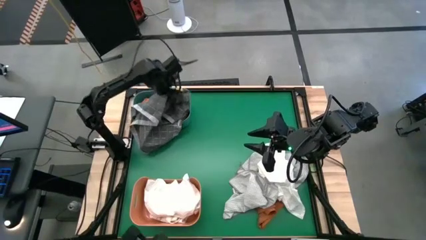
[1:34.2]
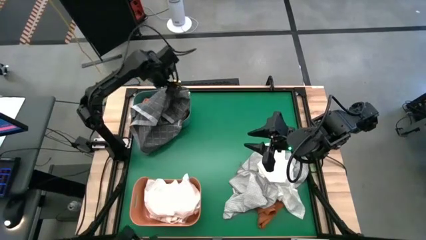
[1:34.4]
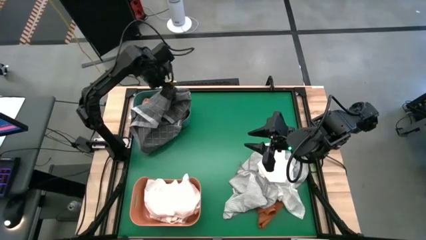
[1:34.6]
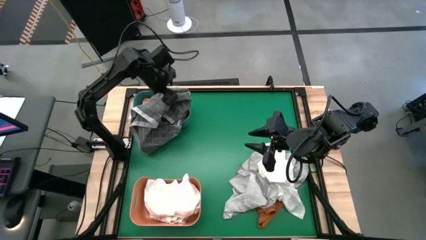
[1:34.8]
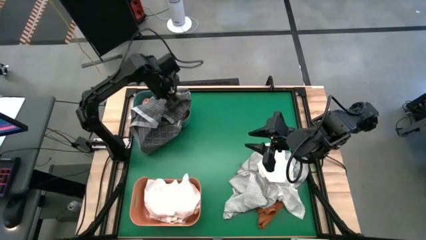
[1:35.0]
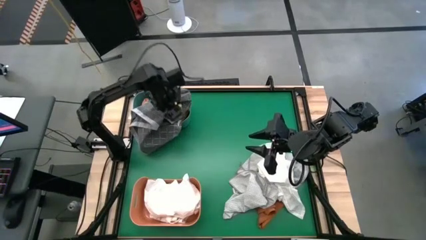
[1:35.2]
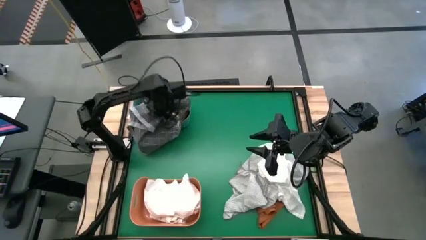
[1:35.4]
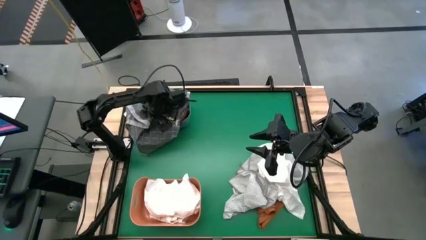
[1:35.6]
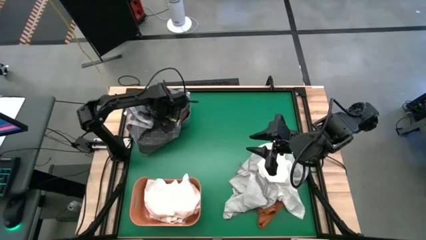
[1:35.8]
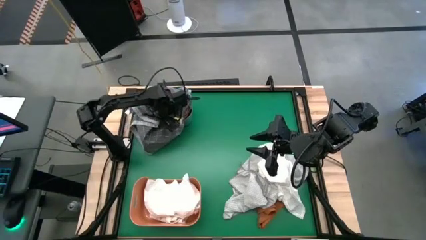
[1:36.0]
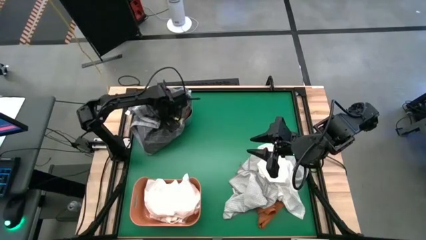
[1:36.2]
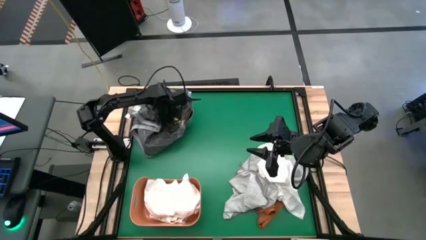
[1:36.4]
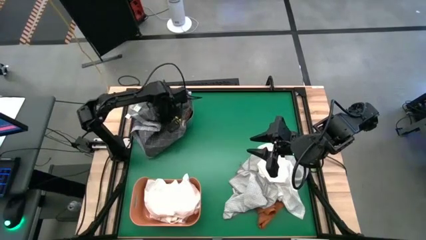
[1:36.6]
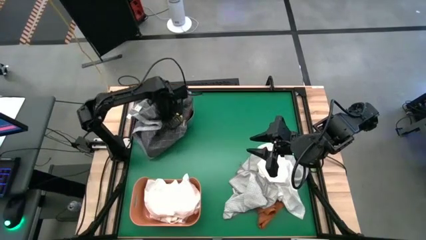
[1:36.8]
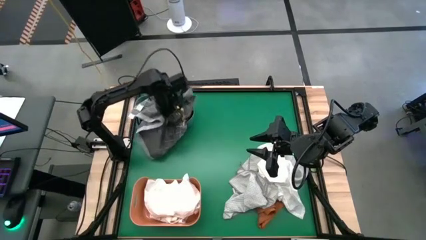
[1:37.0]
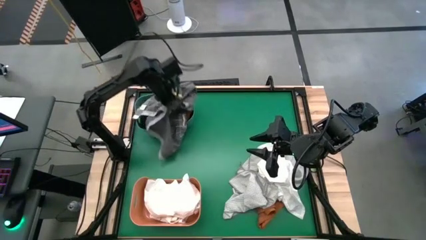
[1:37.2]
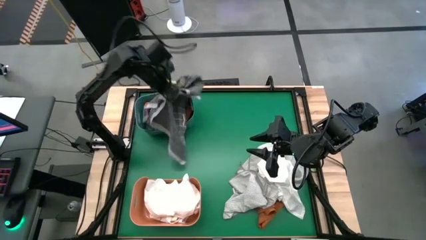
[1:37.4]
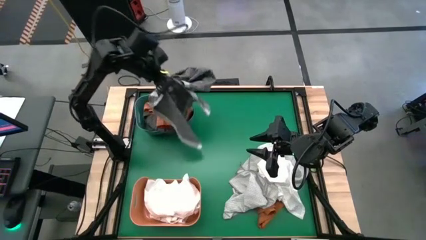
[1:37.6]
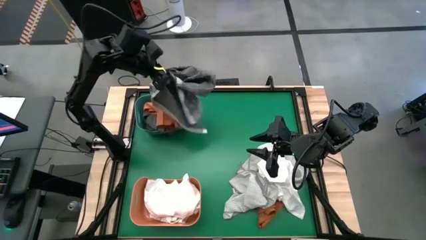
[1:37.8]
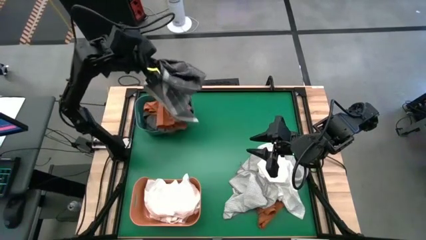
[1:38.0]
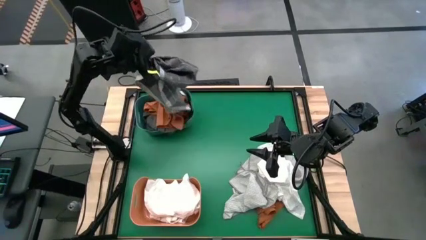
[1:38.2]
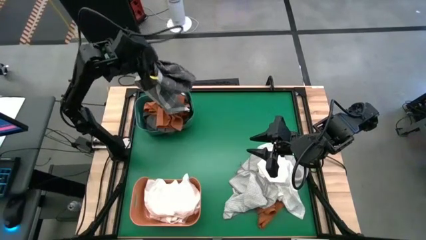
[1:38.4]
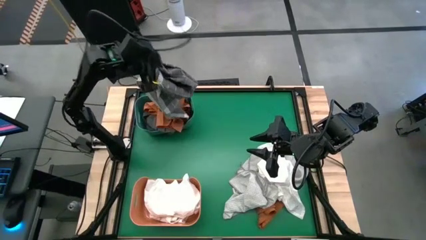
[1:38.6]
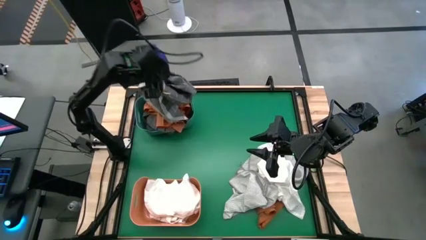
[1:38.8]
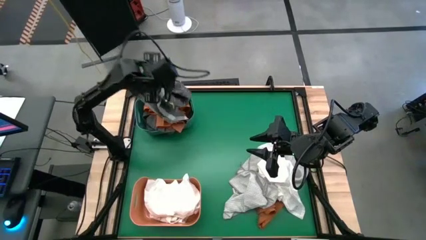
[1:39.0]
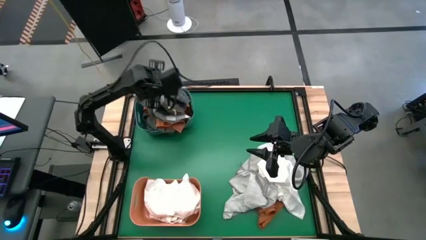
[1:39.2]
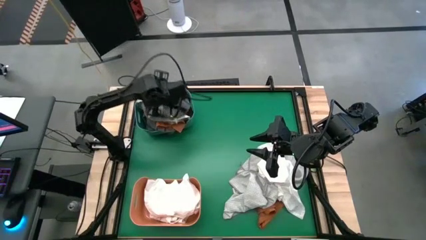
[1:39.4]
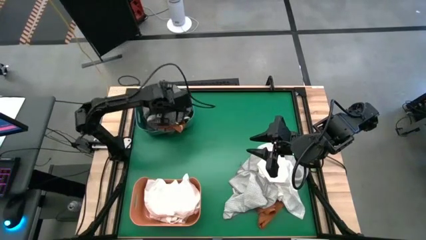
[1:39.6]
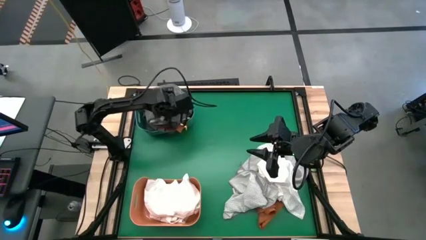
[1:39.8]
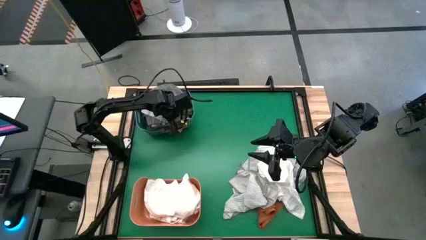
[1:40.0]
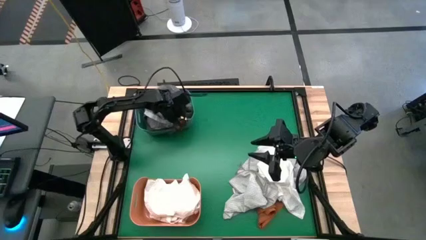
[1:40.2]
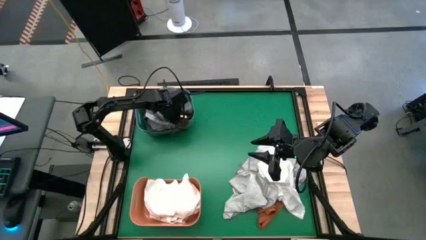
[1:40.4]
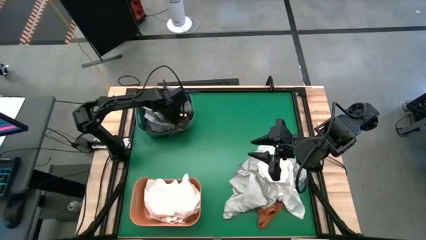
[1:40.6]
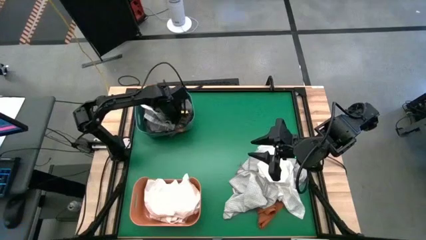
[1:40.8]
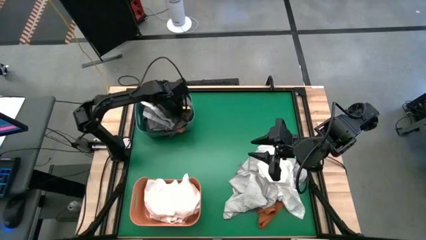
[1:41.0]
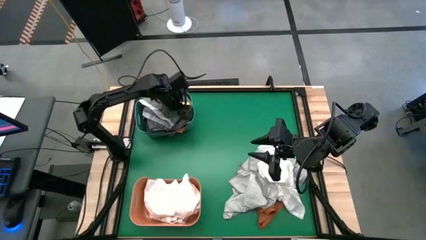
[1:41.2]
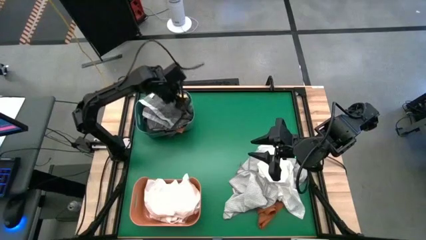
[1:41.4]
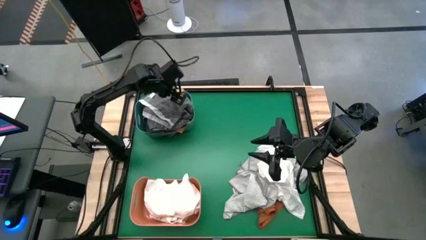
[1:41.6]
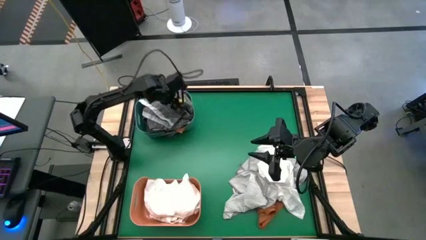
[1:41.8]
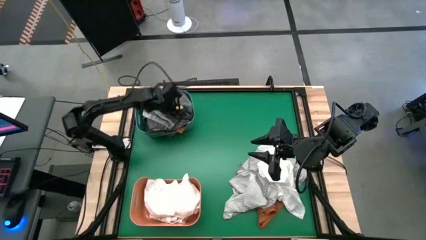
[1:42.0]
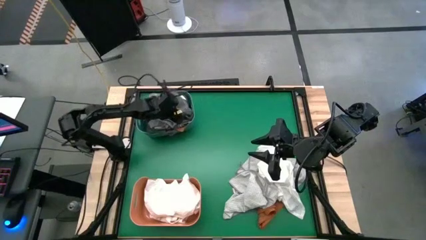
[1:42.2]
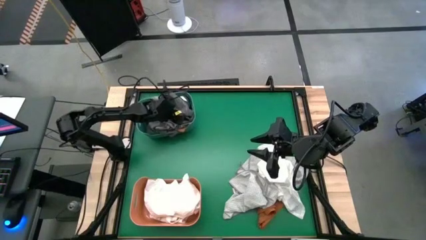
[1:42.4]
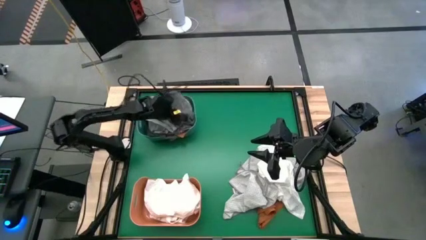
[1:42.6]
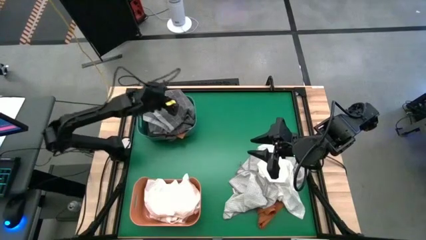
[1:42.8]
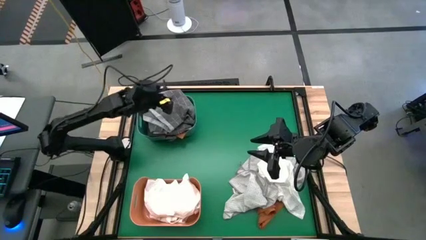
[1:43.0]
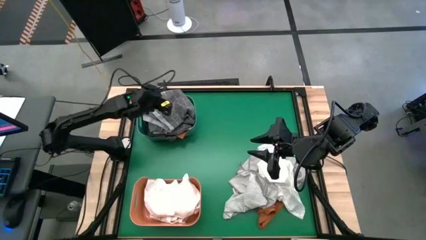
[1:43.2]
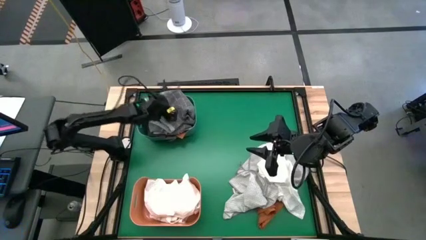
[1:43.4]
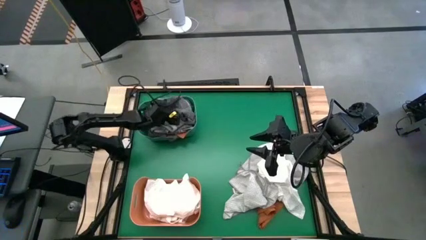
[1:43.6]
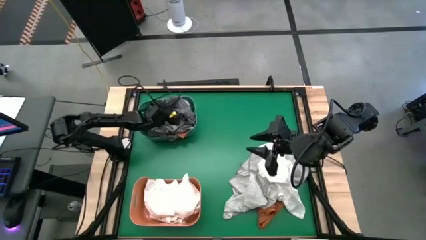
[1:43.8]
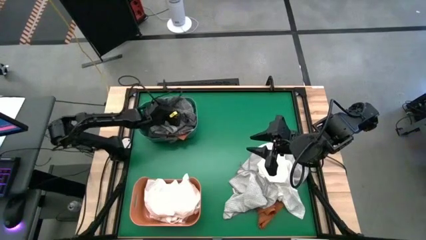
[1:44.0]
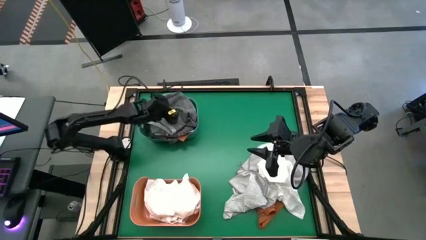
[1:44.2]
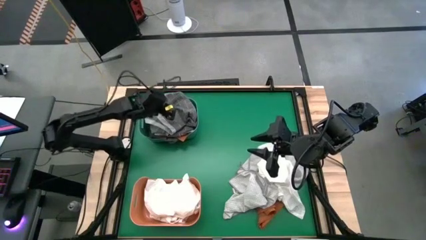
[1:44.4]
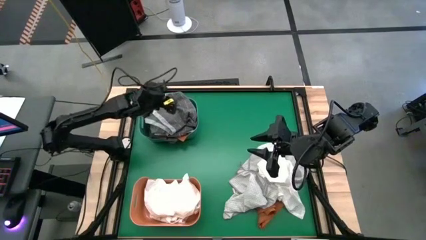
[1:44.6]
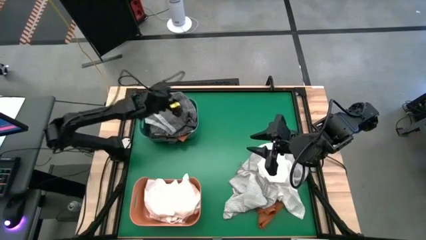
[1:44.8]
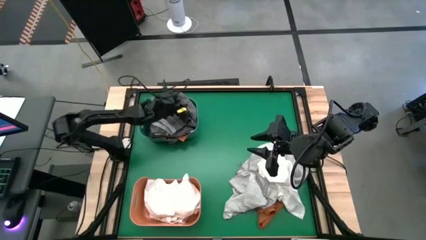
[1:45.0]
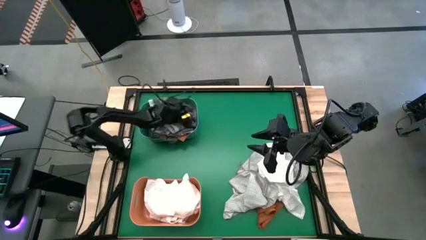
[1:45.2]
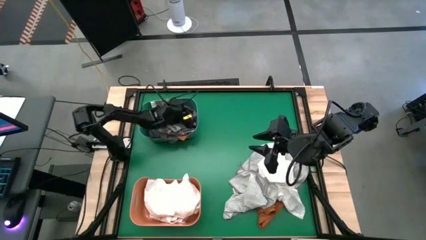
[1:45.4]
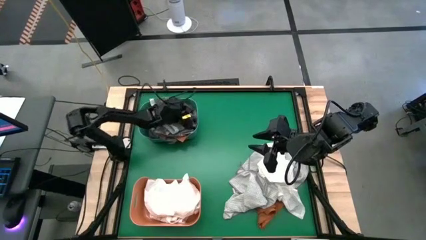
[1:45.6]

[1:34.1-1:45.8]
Task: Sort microfiber towel by color & place in baskets
Put the black and white microfiber towel into the green bin
